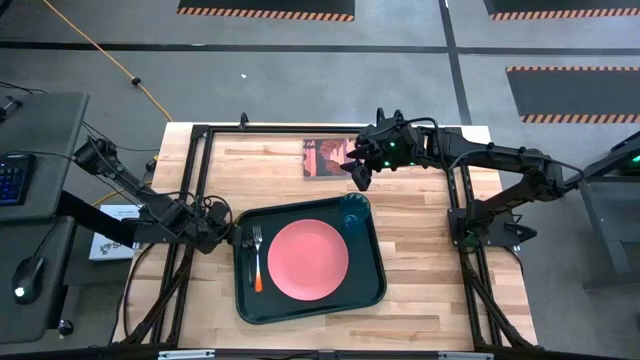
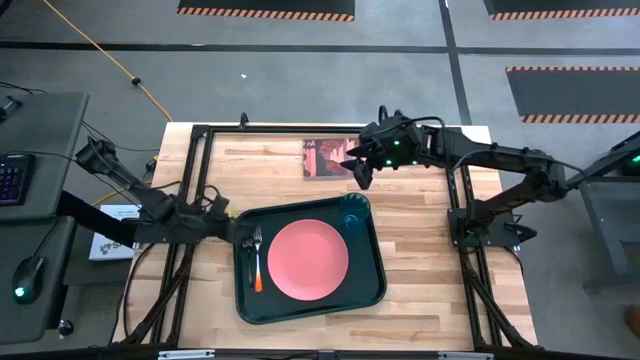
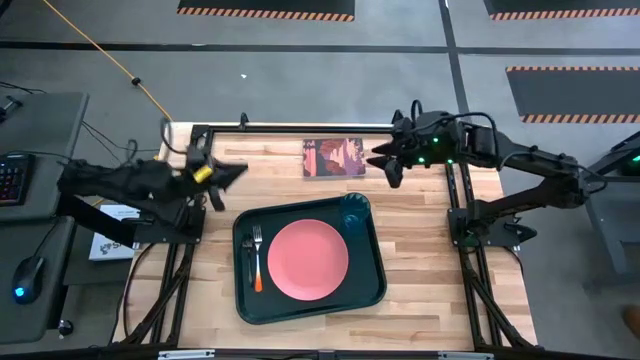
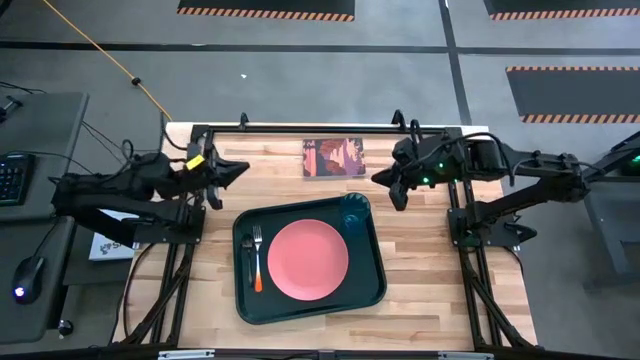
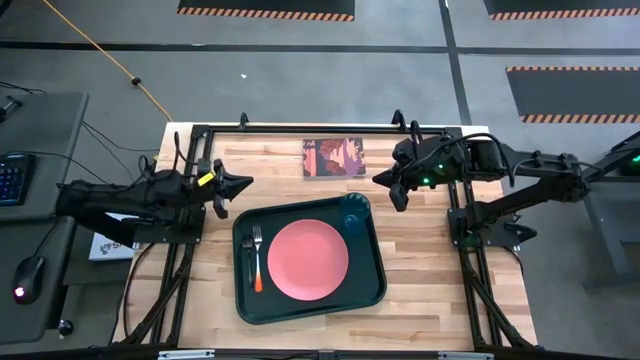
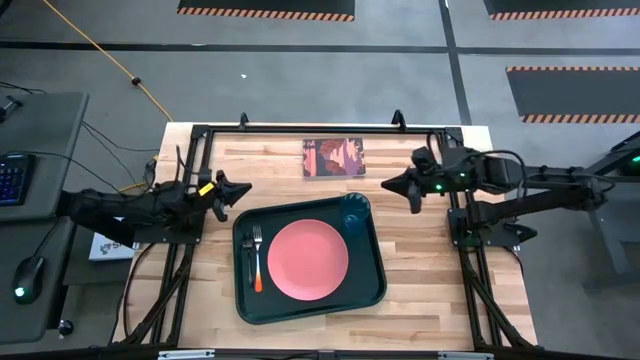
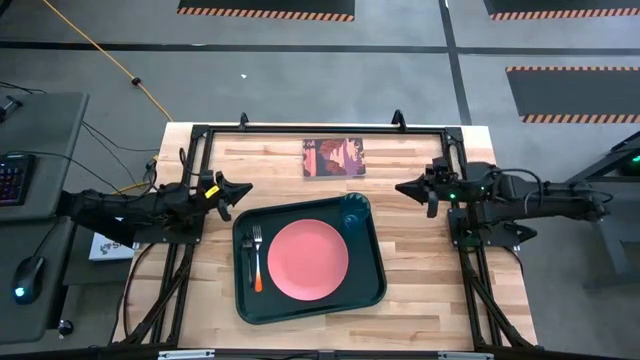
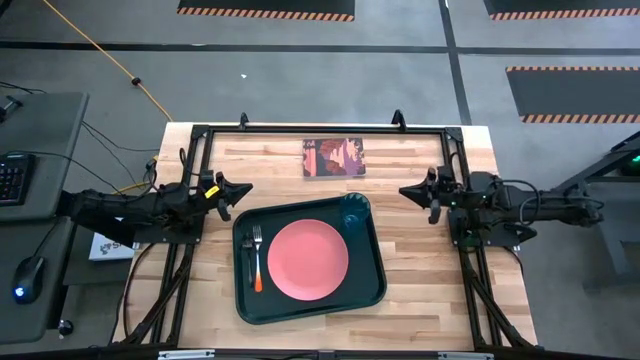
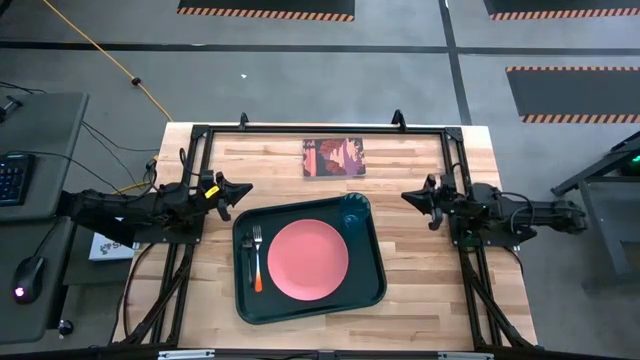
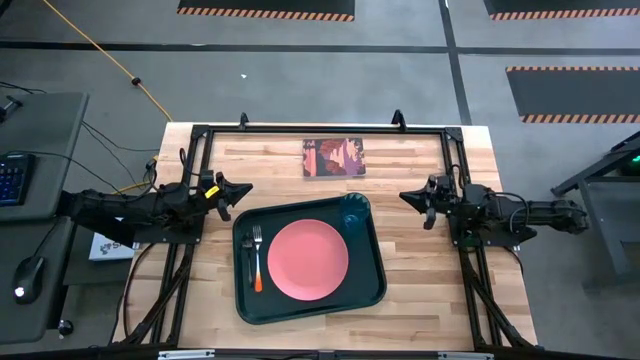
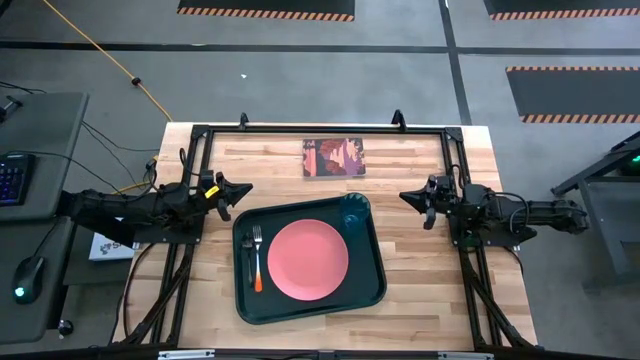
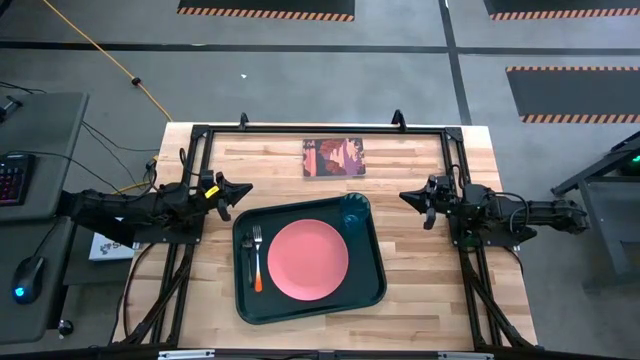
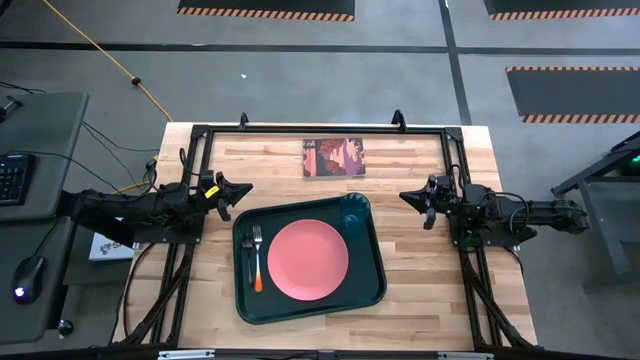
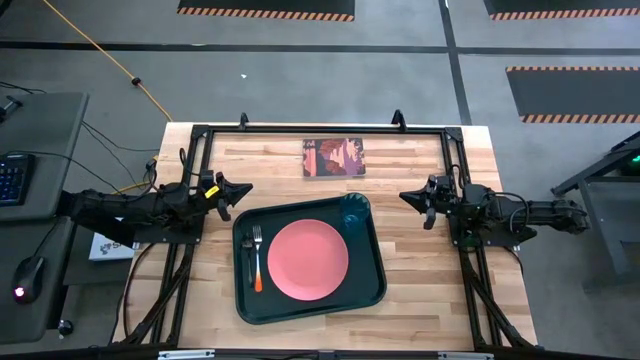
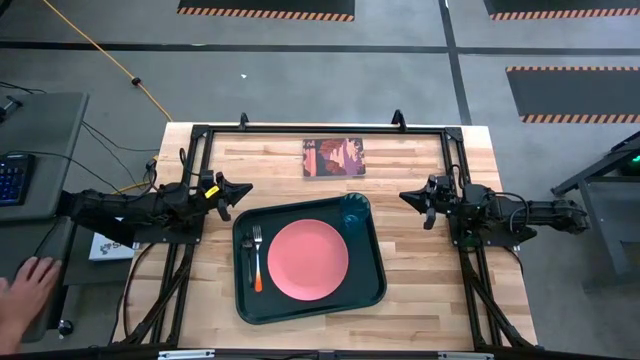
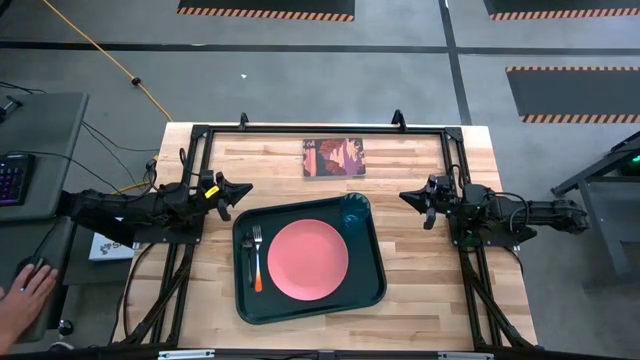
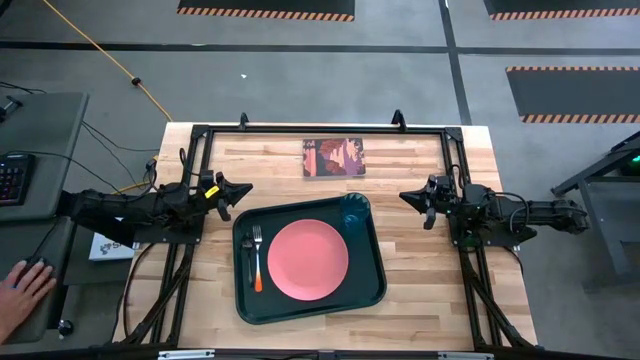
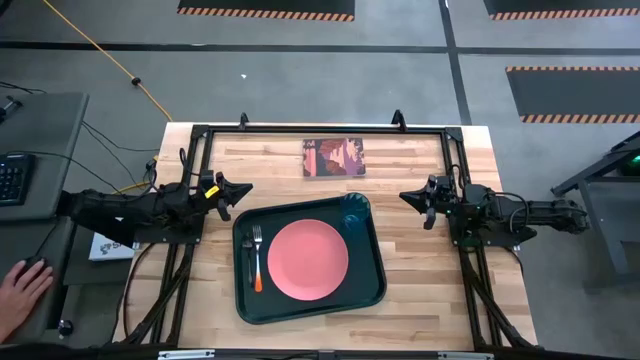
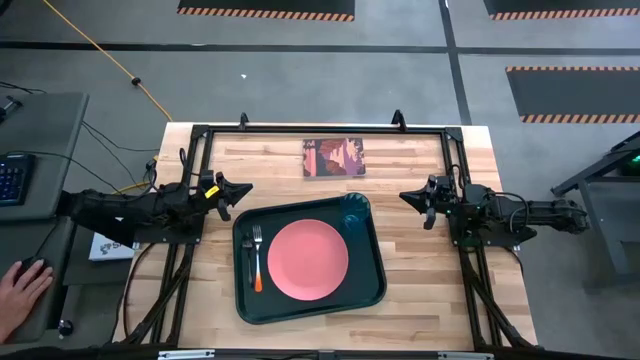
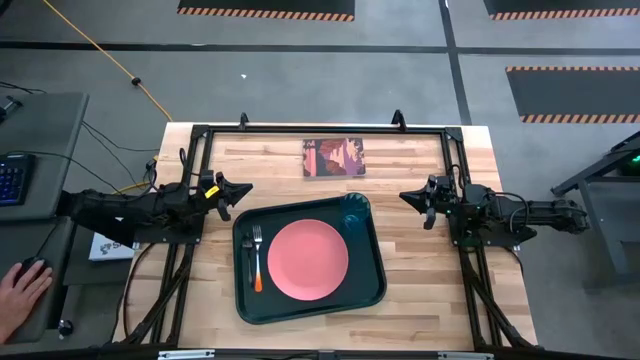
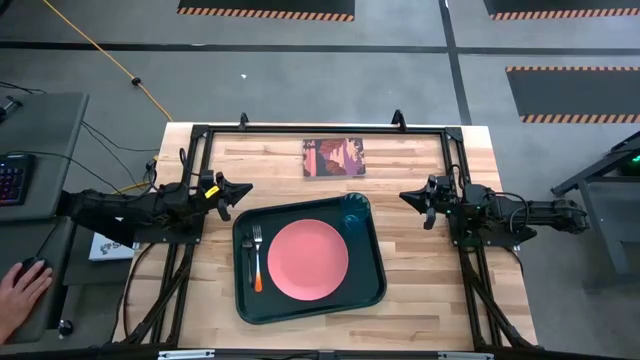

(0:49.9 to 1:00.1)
Task: Pick and place plate/cup/fork/spoon on tray
Return to Home Position

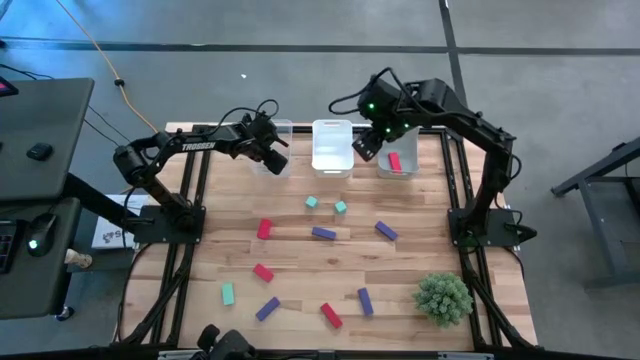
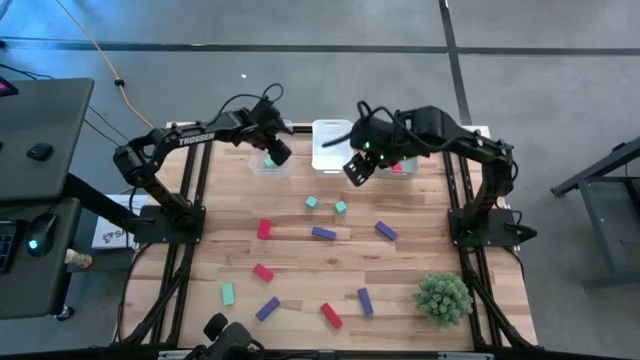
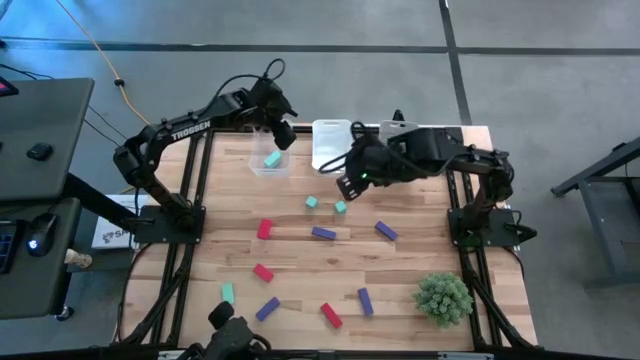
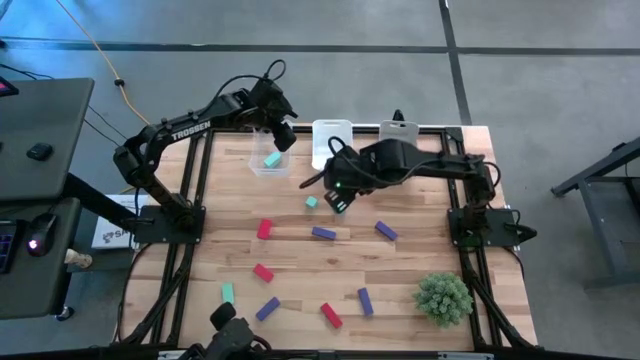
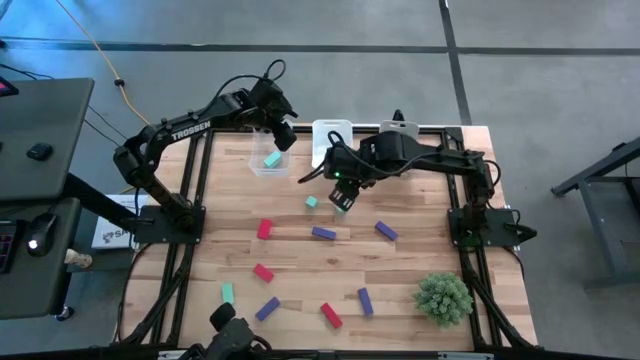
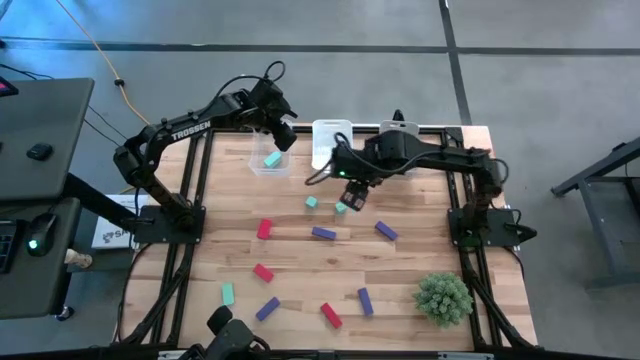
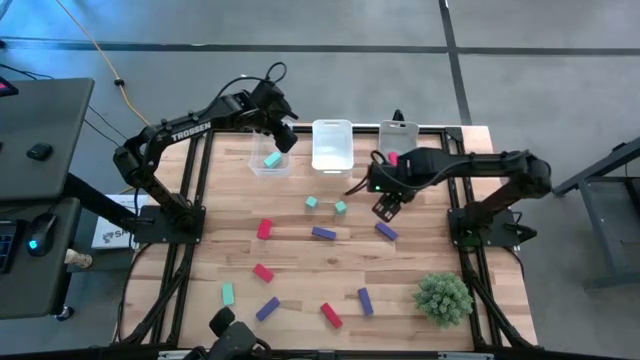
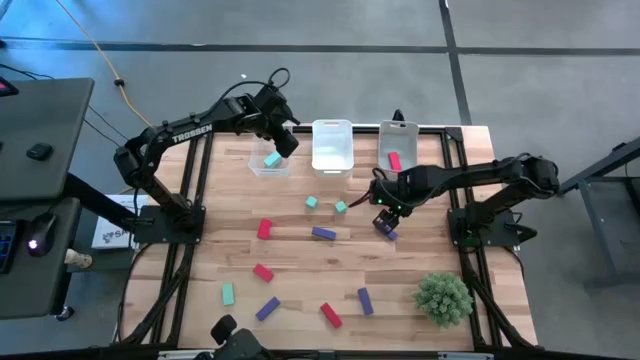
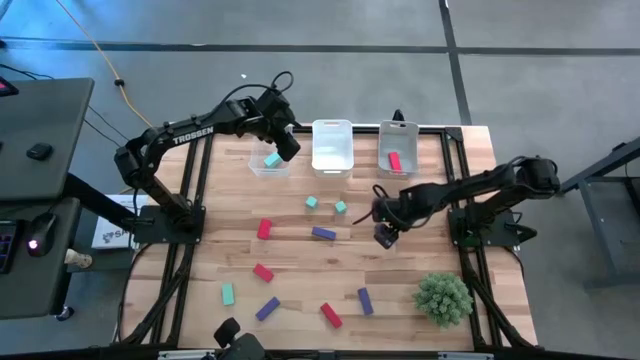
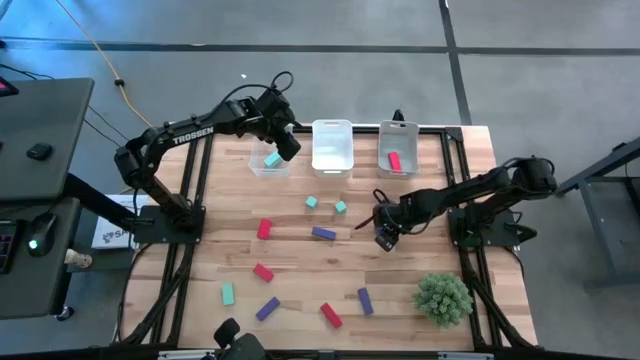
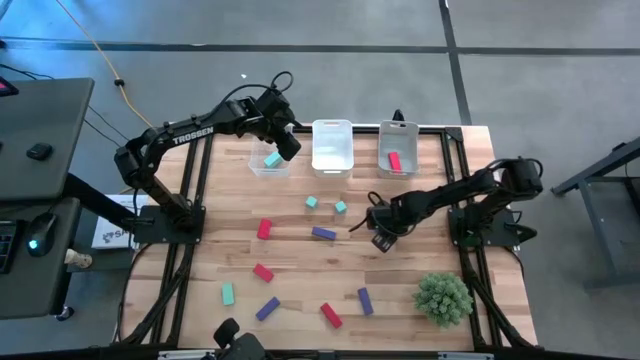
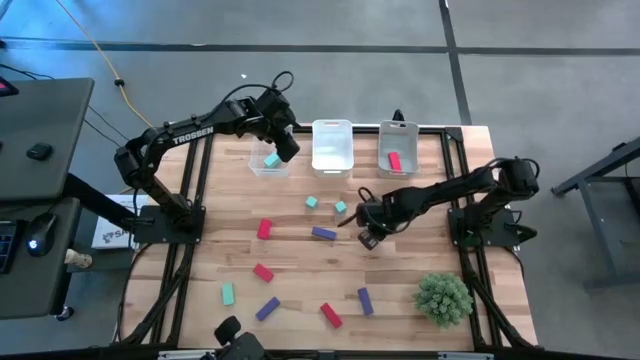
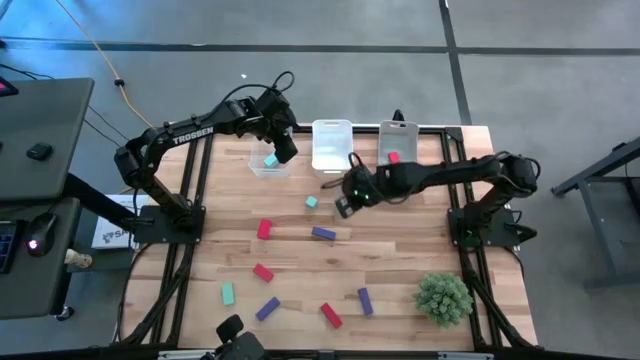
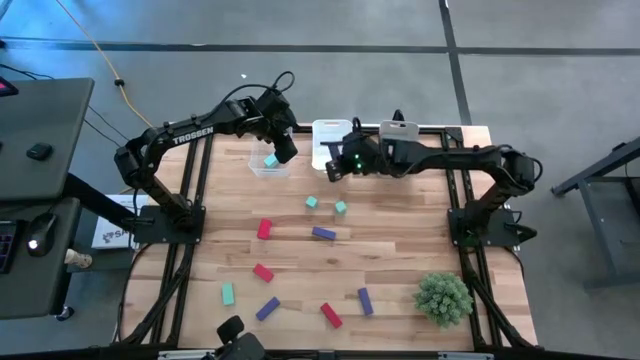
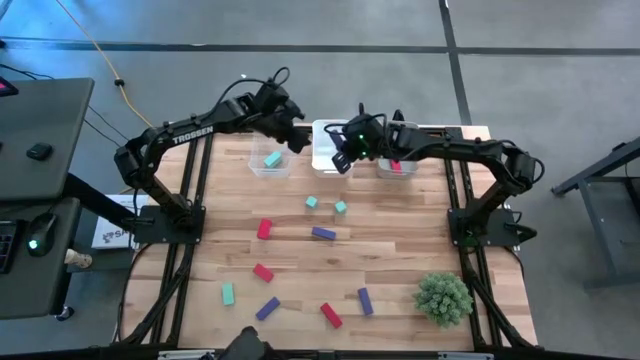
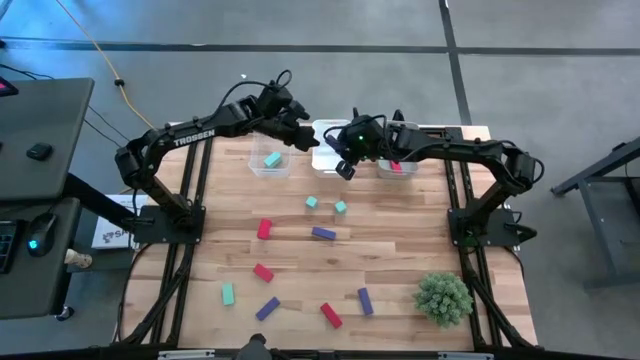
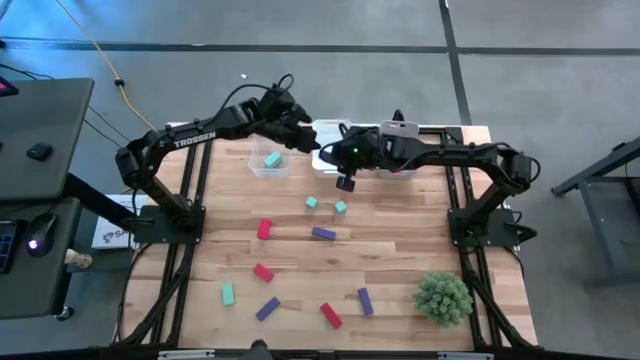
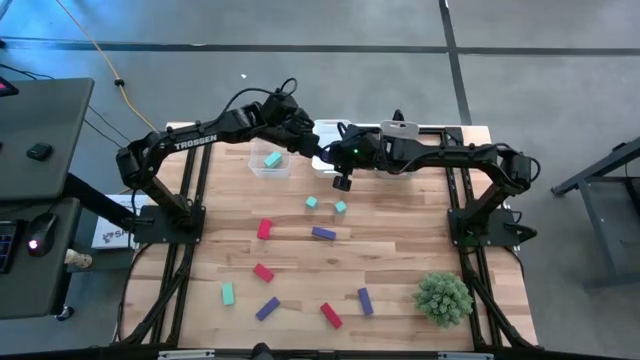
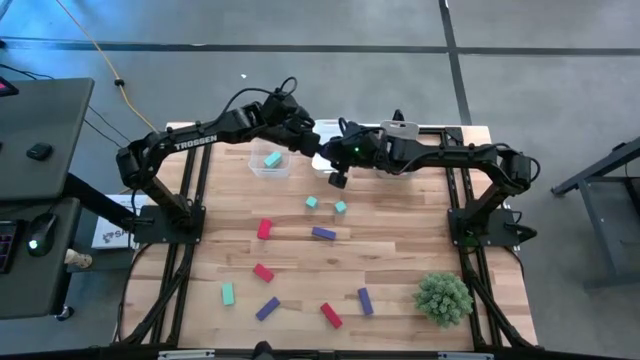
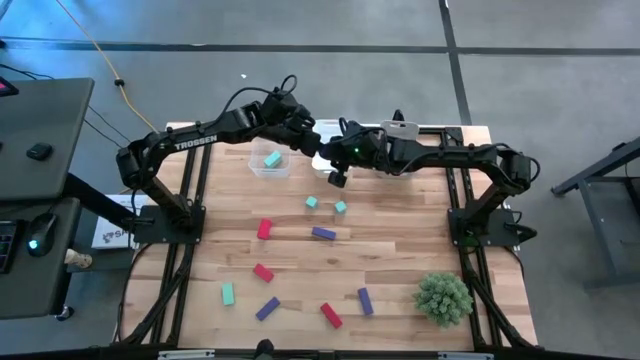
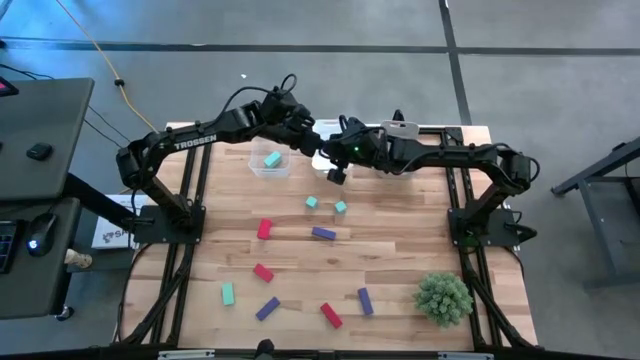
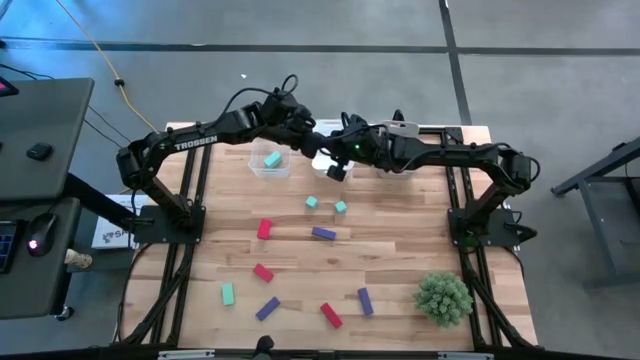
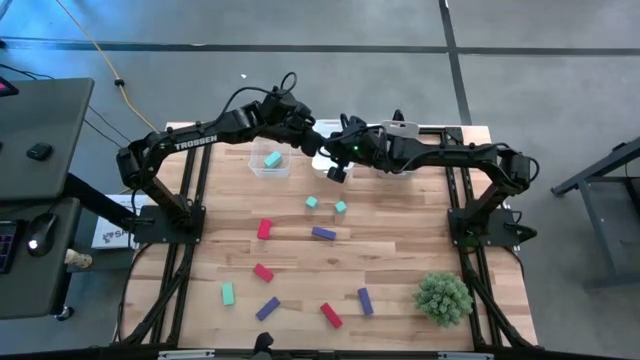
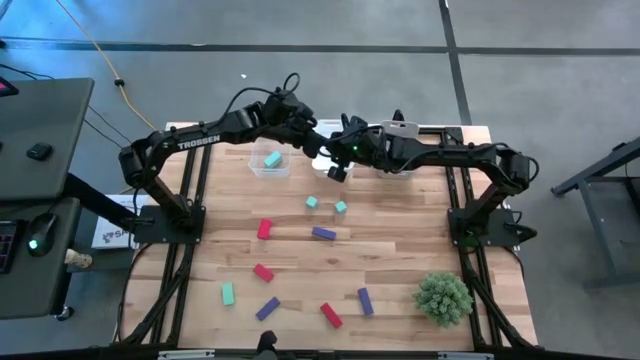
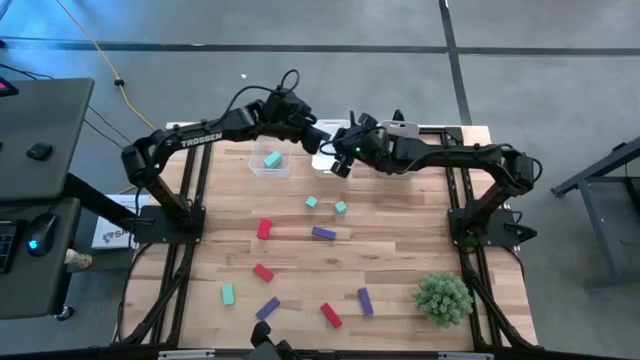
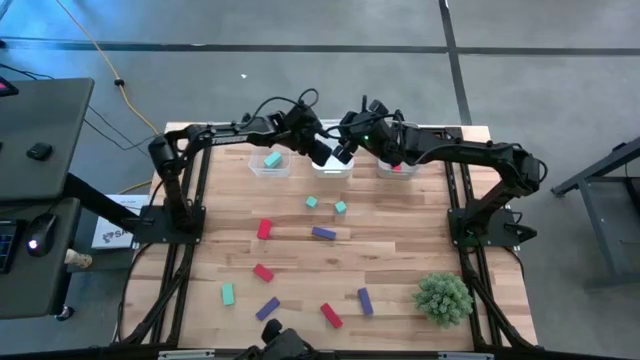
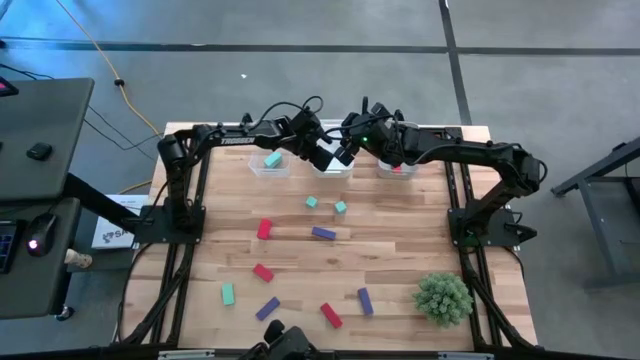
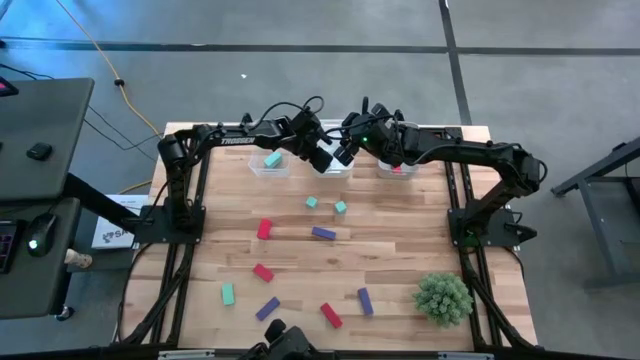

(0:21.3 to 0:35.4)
Task: Sort & place blocks by color
Put the blue block into the white bin
